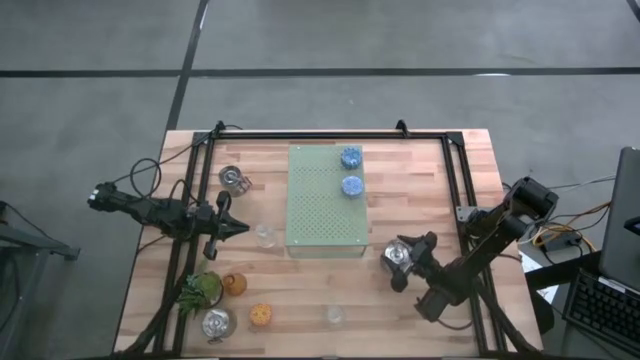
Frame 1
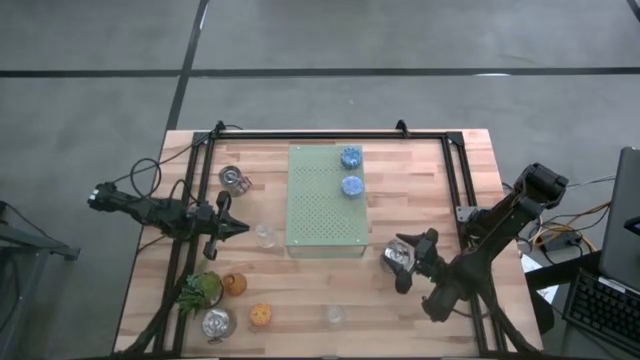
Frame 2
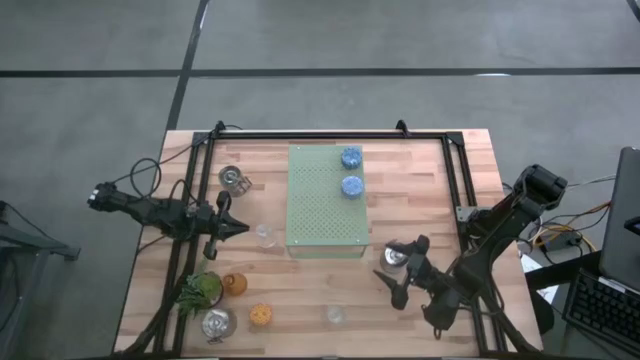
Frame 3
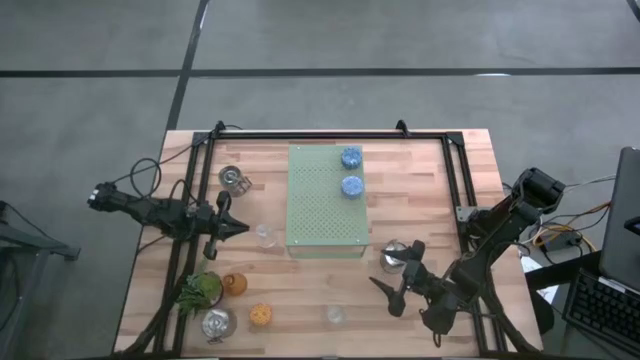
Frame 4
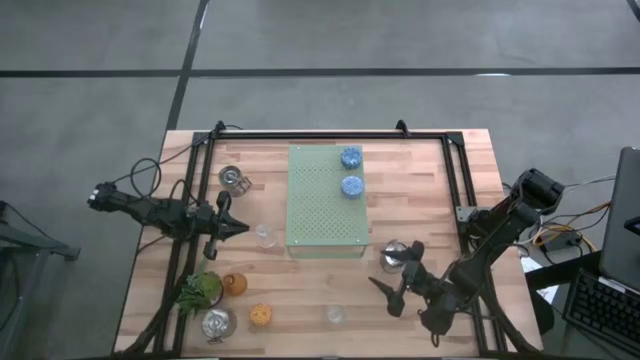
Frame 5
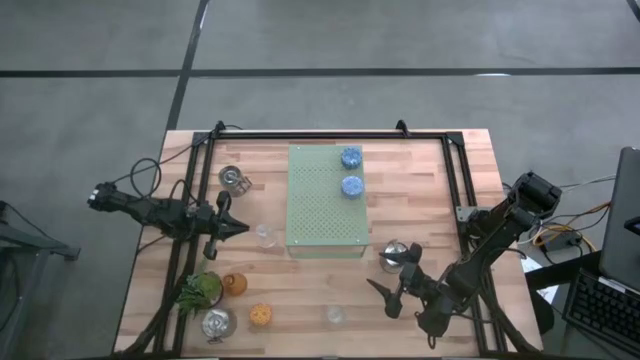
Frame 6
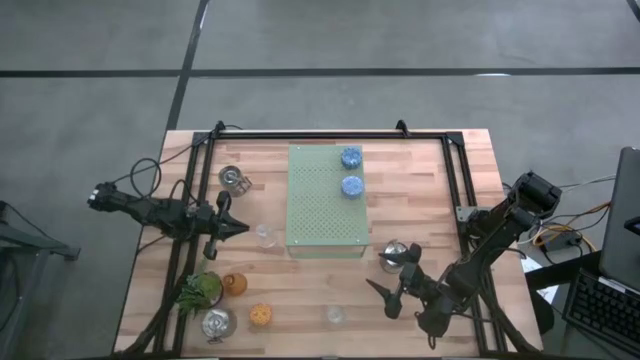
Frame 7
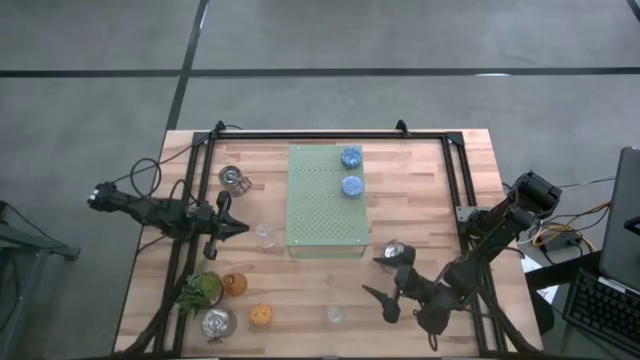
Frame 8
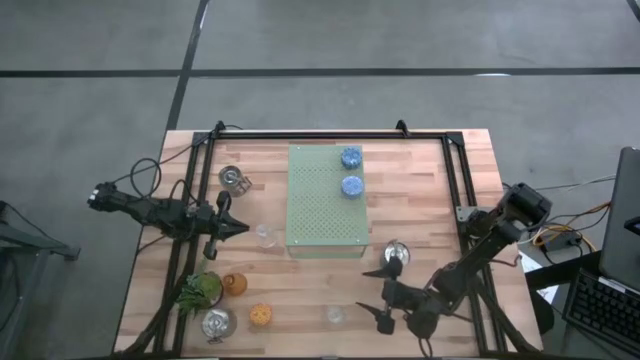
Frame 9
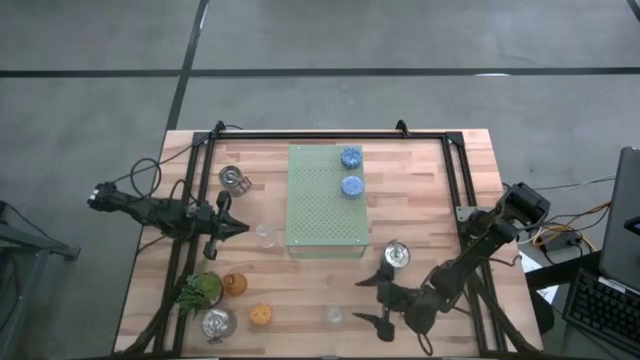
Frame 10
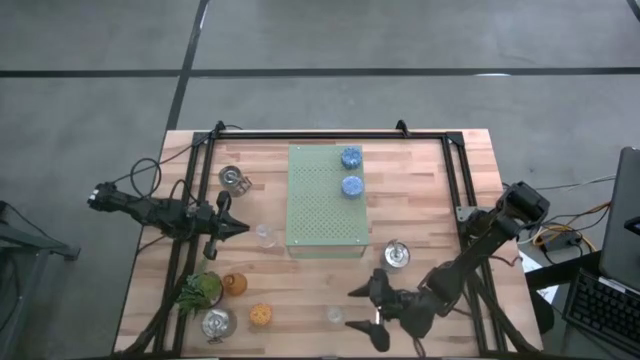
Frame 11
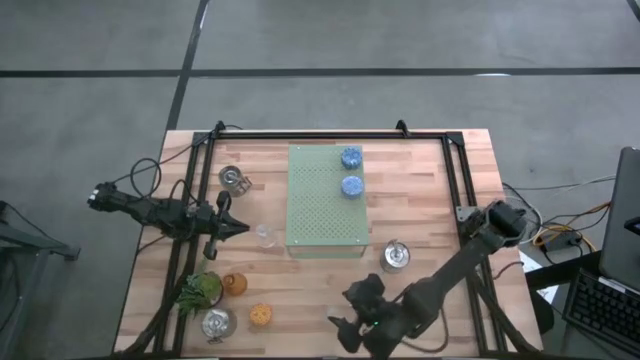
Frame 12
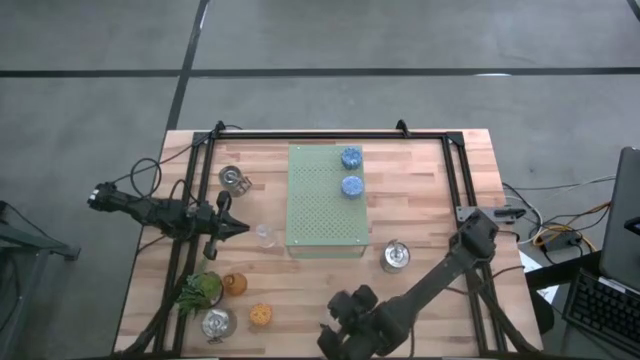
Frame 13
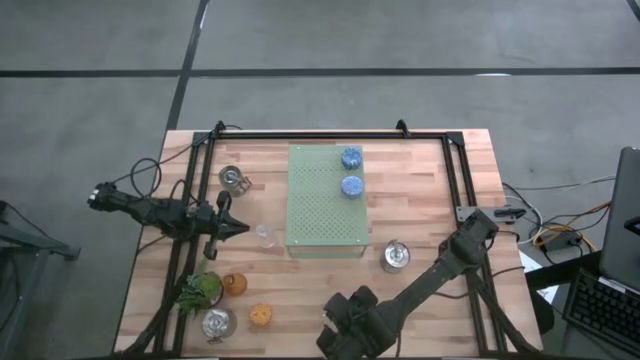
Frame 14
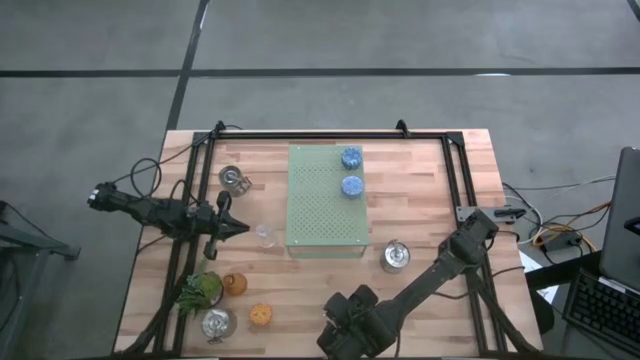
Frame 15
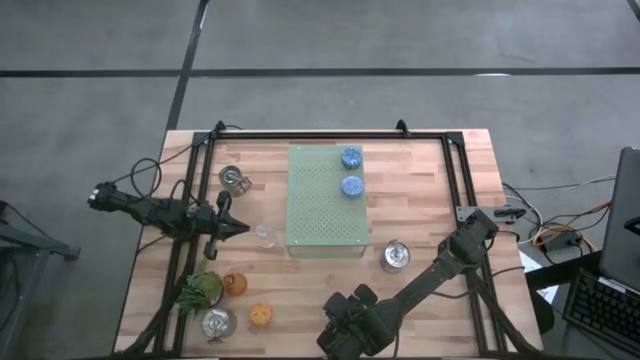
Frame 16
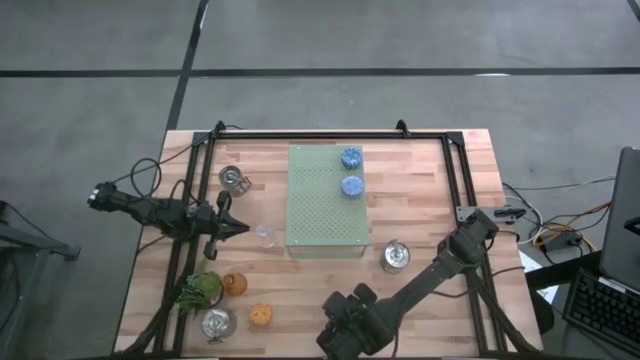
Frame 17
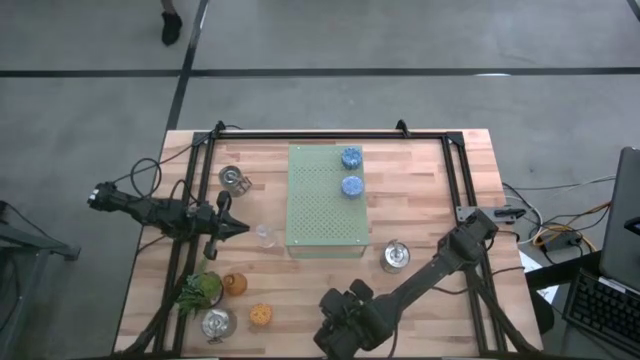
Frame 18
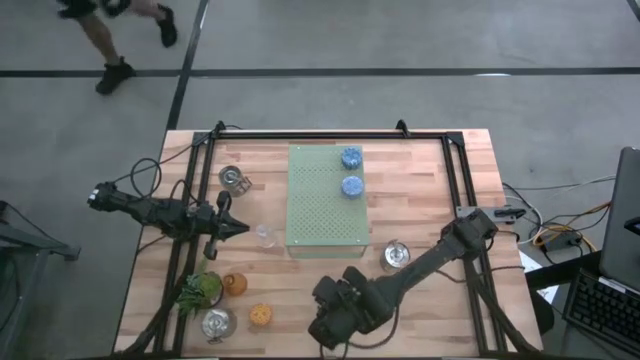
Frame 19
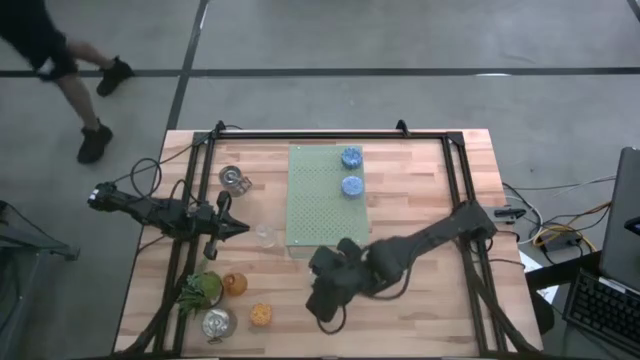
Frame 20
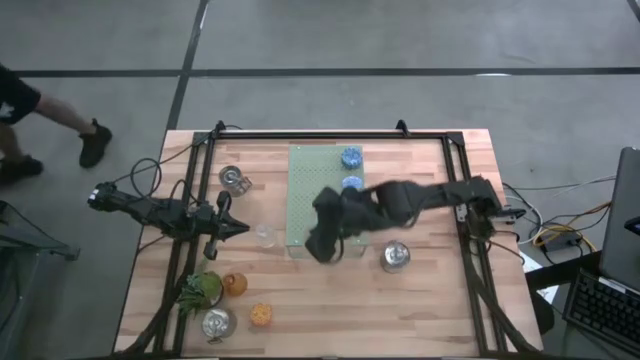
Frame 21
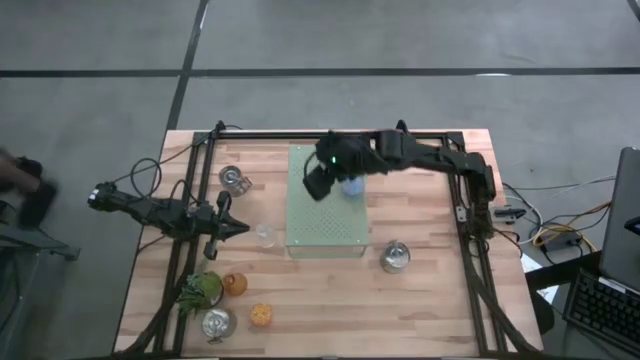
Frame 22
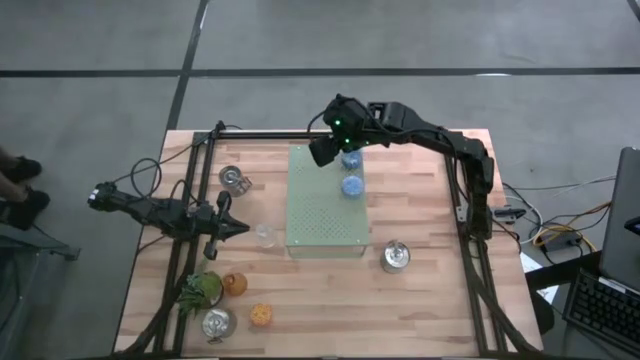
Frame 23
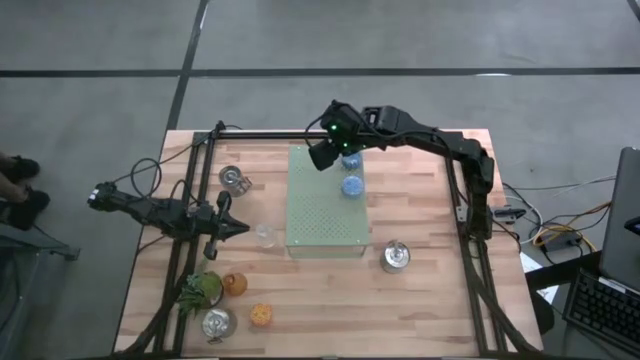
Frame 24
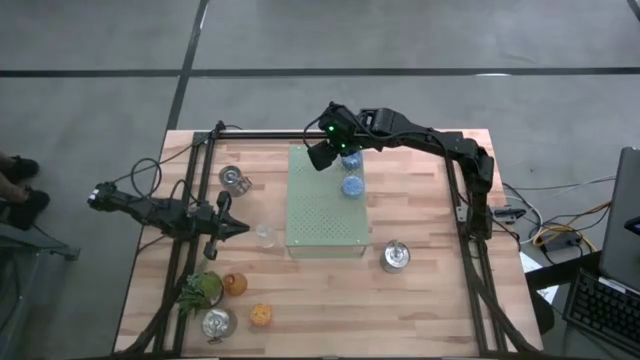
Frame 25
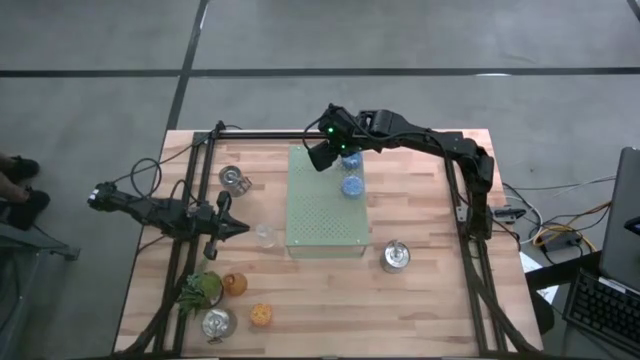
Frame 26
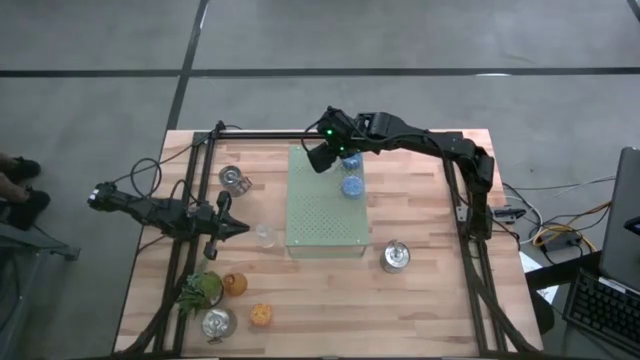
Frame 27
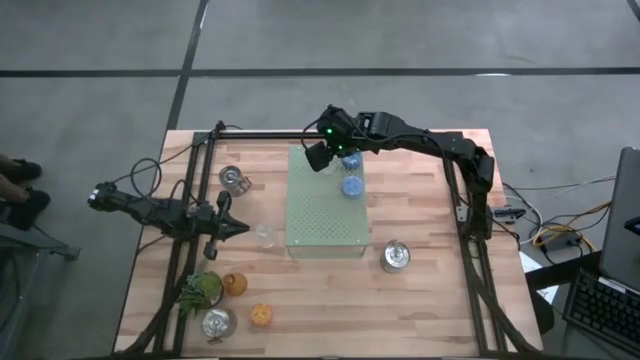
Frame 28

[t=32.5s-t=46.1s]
Task: Pick & Place candle stick holders
Put the bottom transparent candle holder on the shelf

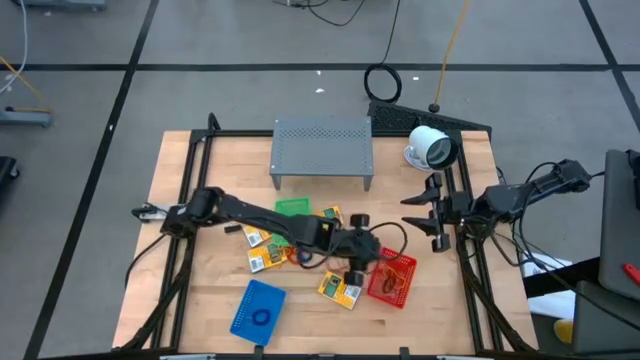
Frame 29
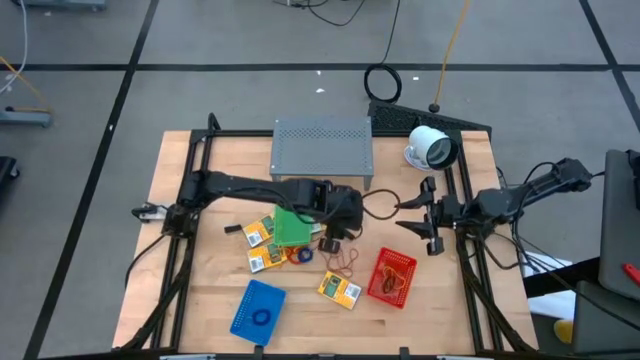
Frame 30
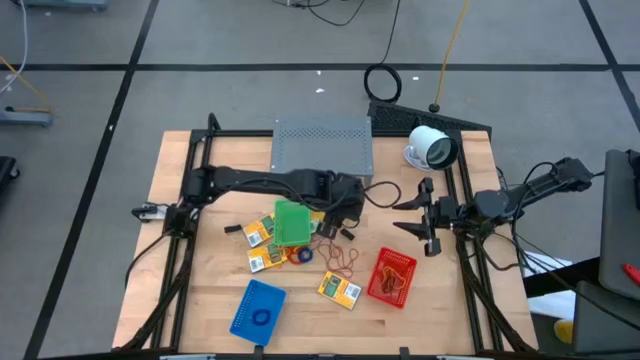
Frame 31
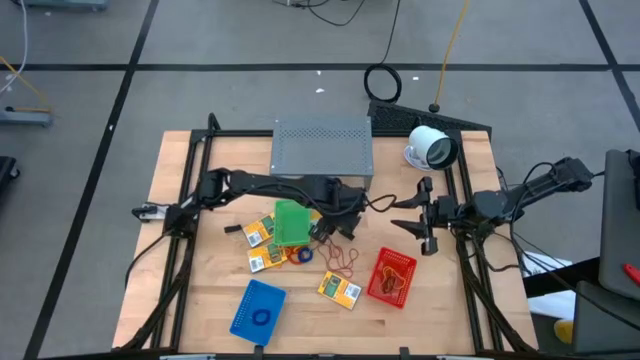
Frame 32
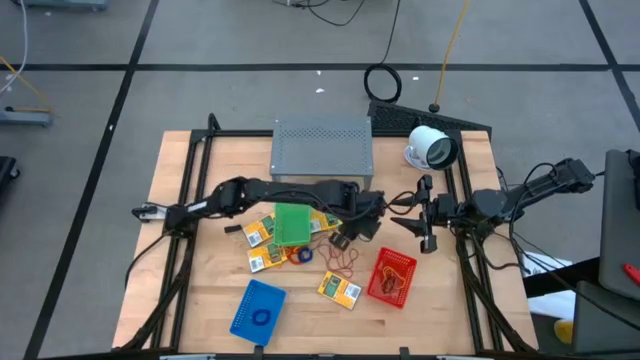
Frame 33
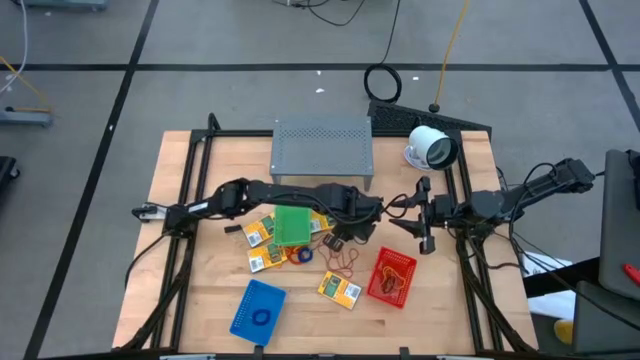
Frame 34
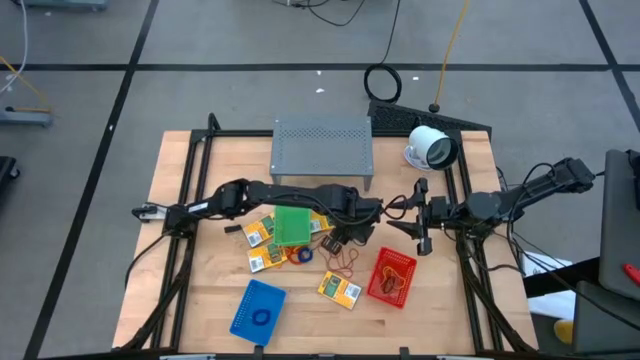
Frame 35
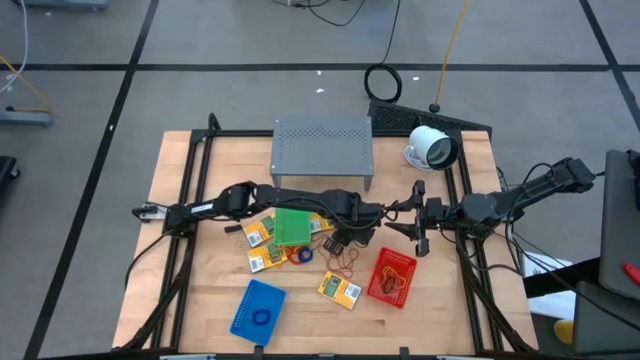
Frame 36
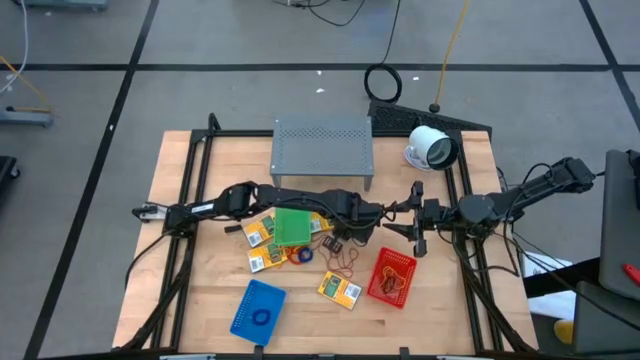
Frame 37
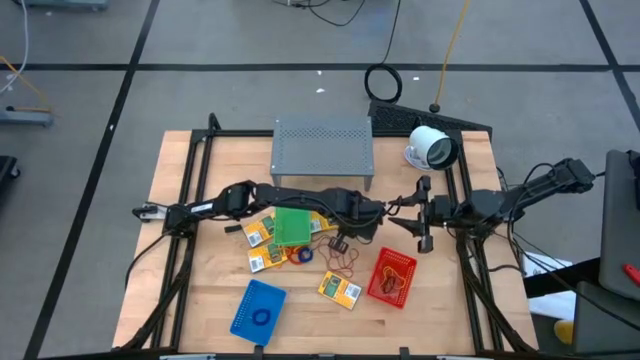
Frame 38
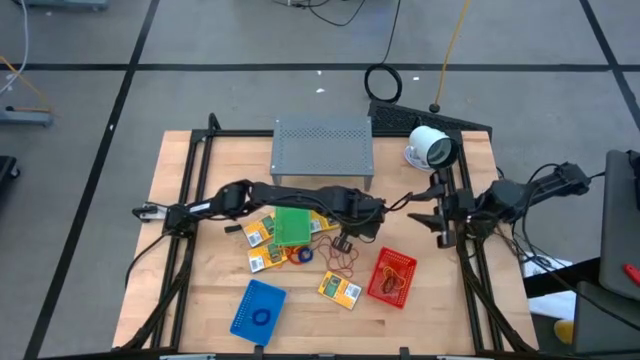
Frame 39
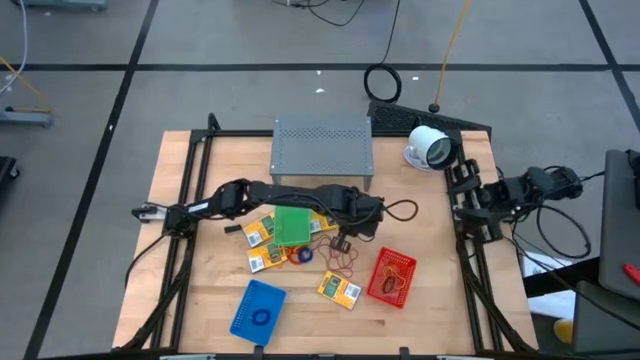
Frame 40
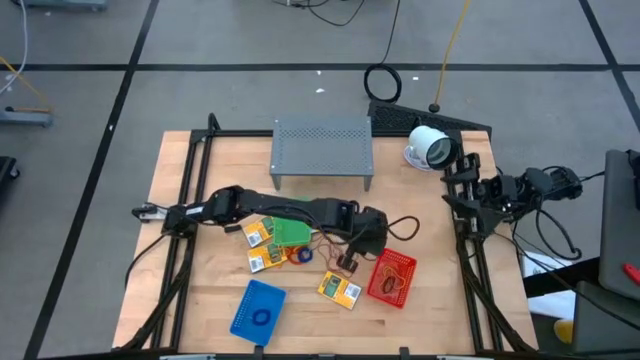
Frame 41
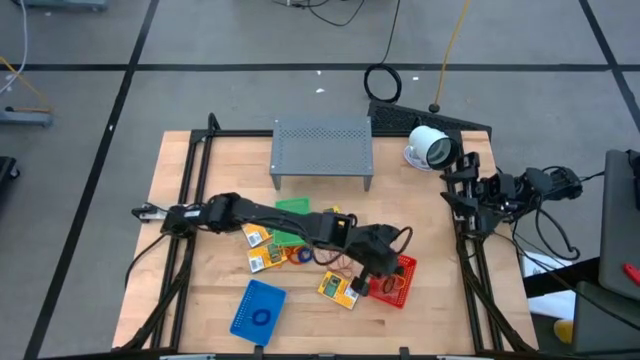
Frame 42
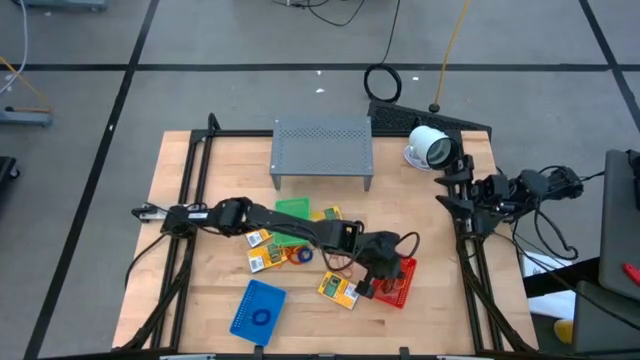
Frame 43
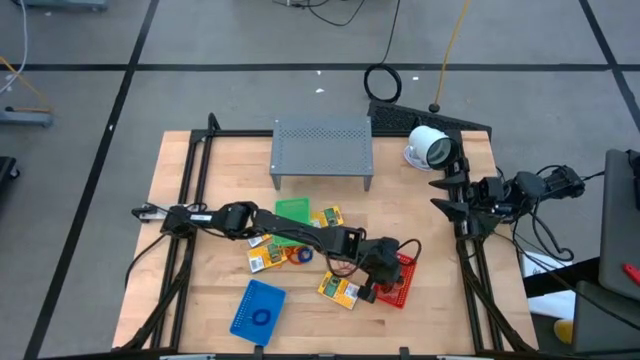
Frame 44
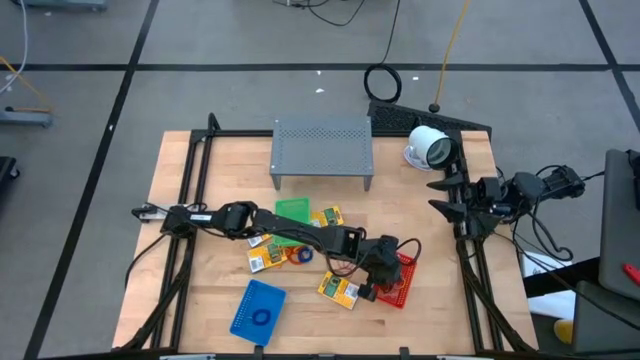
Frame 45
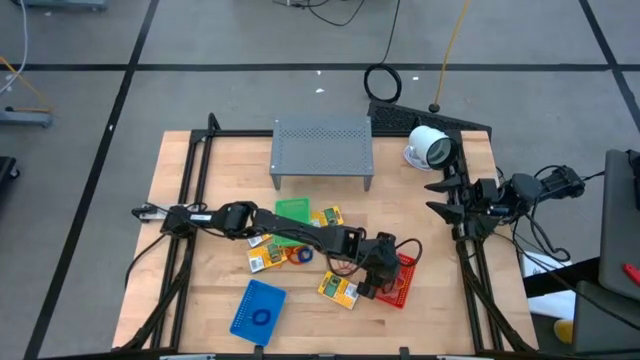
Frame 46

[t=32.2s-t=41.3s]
Task: Pick & Place Office Desk Supplies
Put the black rubber band into the red bin
